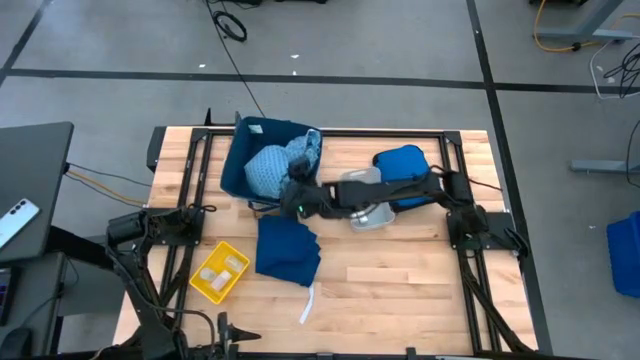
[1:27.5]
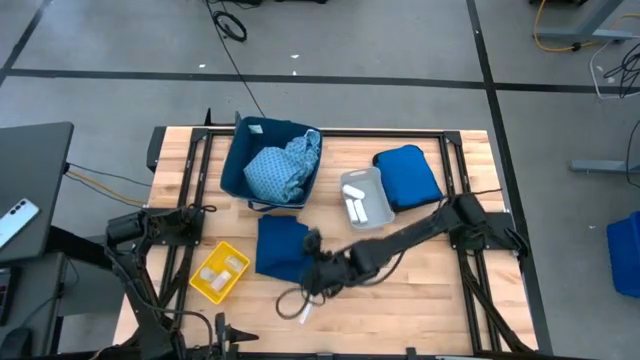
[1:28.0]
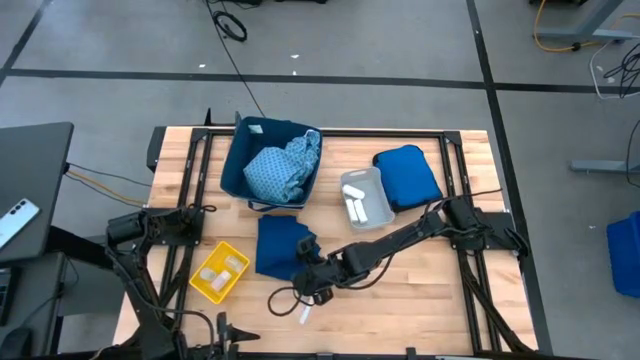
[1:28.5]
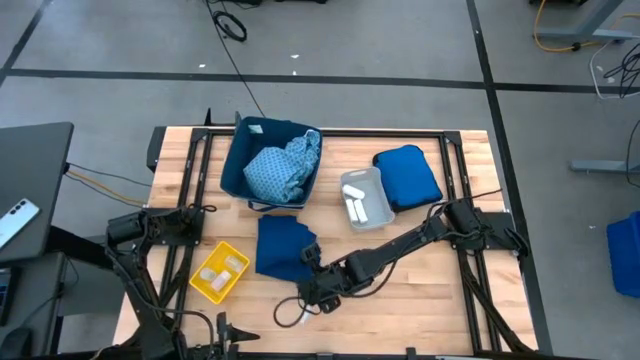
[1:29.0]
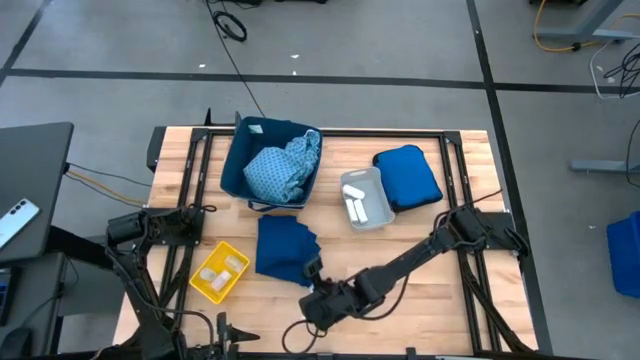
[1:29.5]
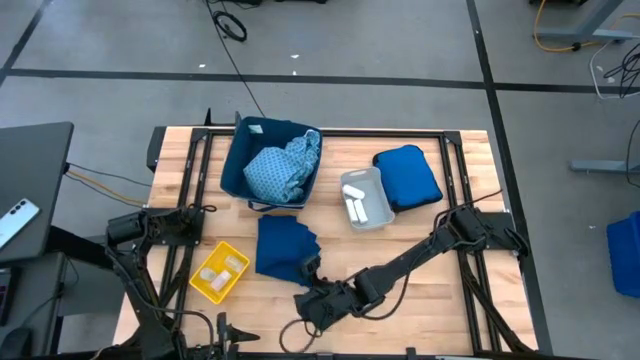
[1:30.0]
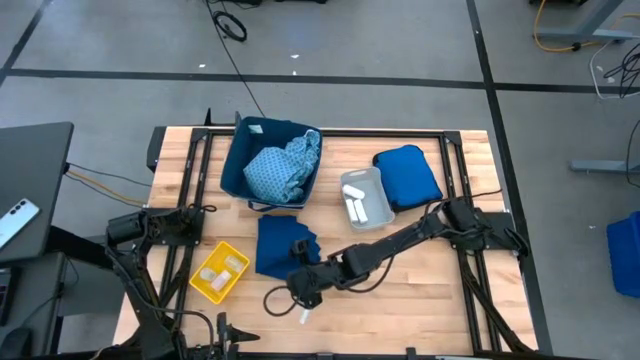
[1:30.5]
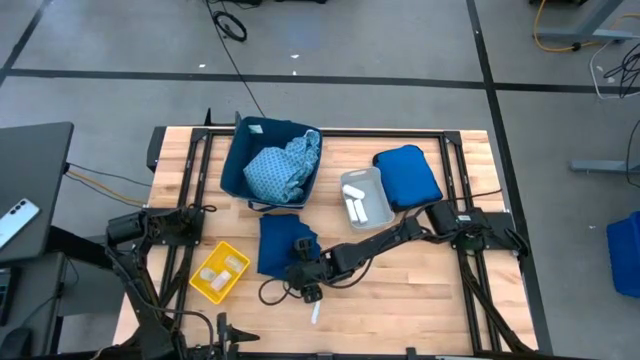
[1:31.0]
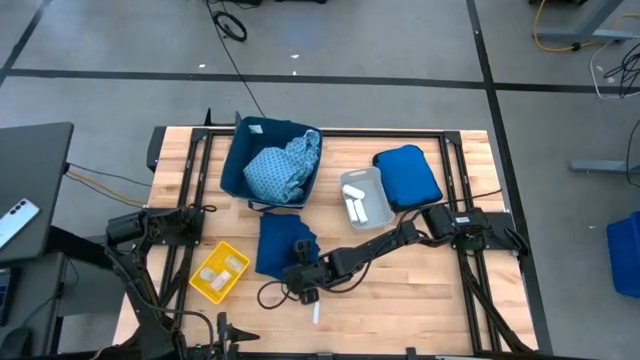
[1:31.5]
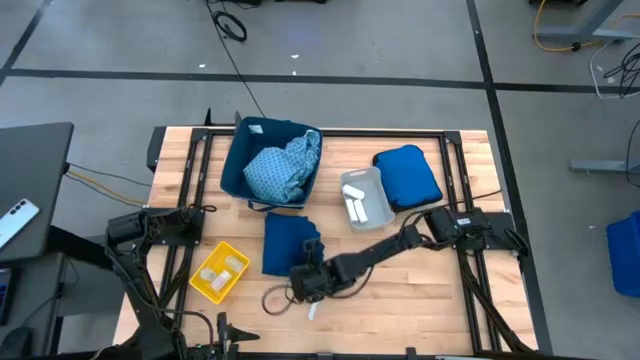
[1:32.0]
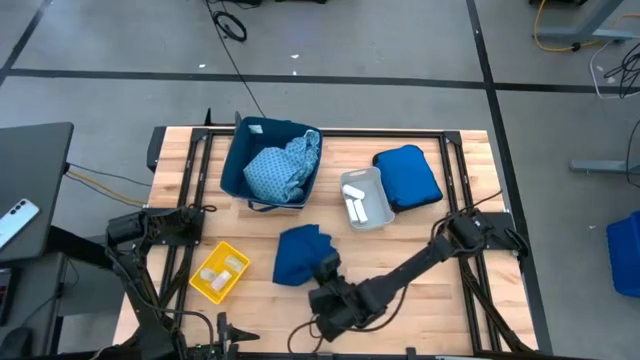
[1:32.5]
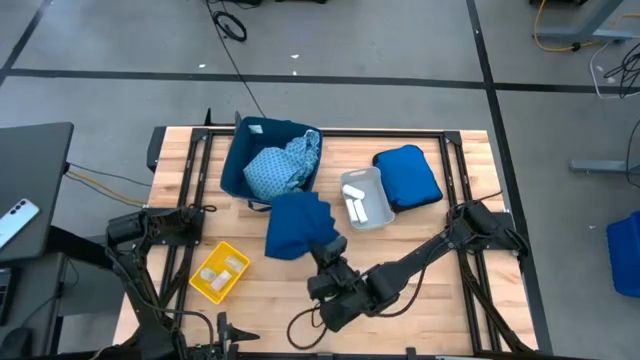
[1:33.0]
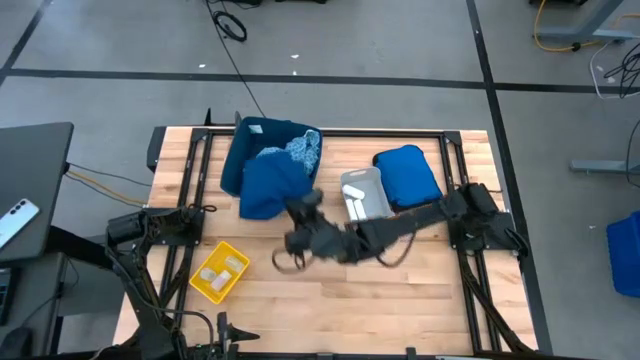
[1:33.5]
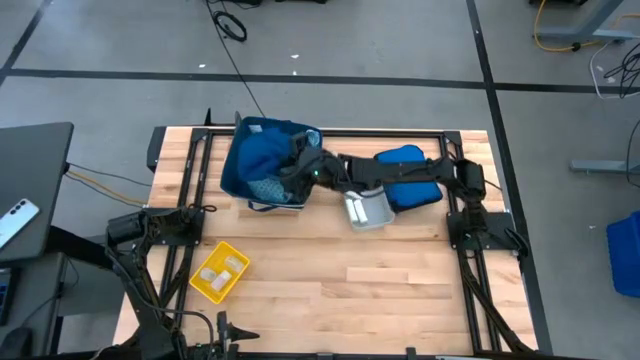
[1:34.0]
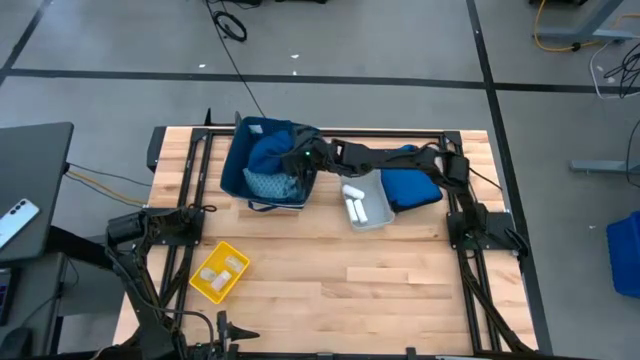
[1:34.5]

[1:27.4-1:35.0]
Task: Pick & place medical supplies in basket/bin
Put the blue patient gown into the blue bin

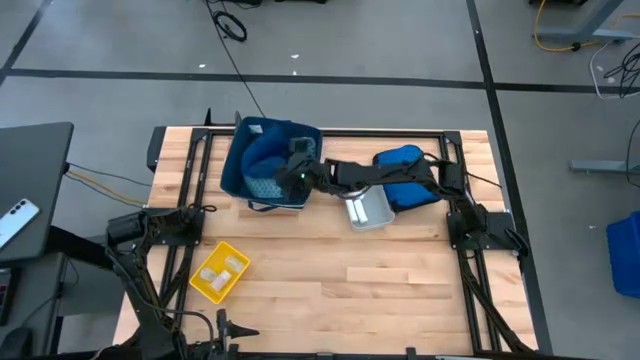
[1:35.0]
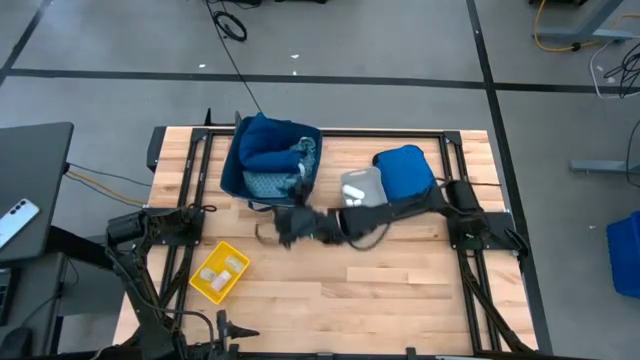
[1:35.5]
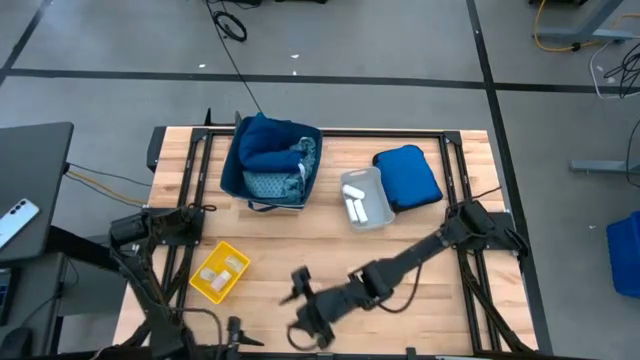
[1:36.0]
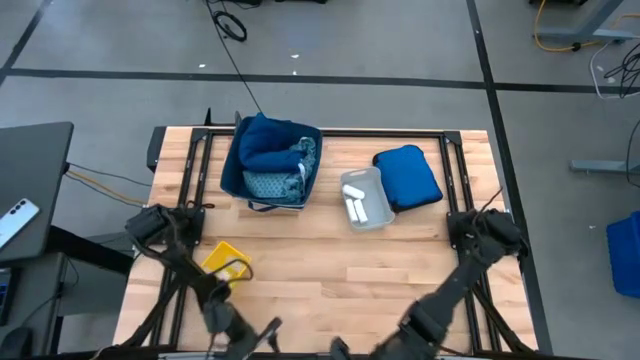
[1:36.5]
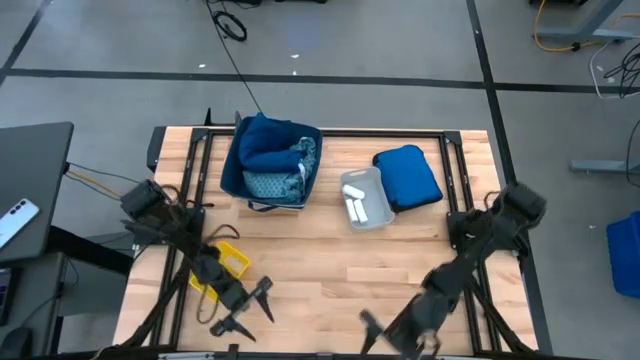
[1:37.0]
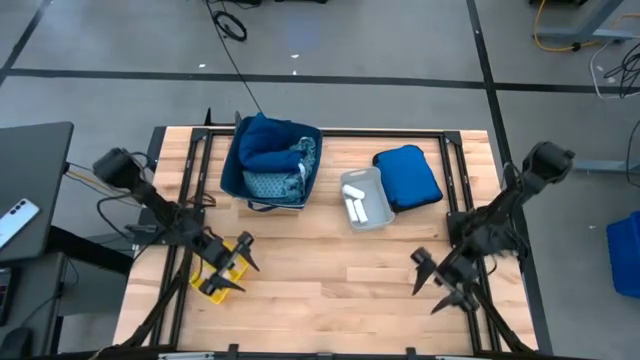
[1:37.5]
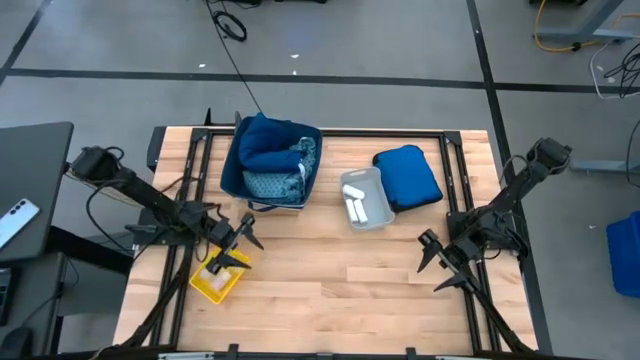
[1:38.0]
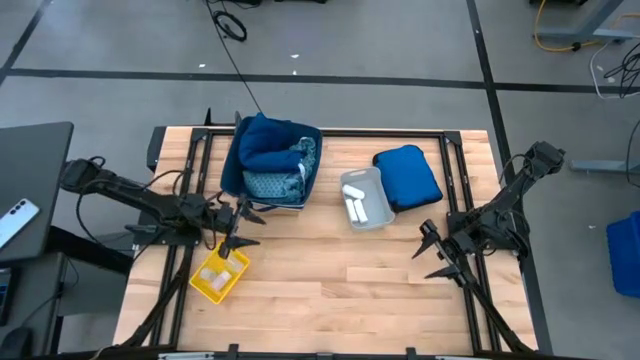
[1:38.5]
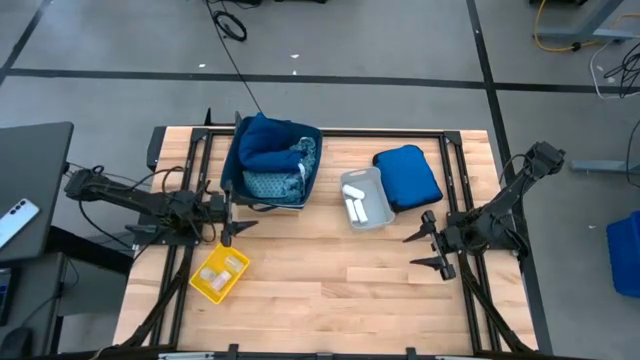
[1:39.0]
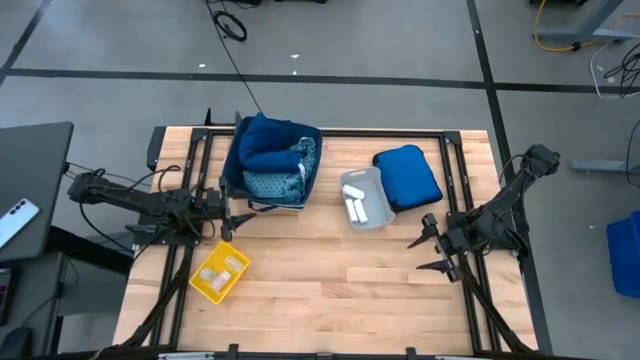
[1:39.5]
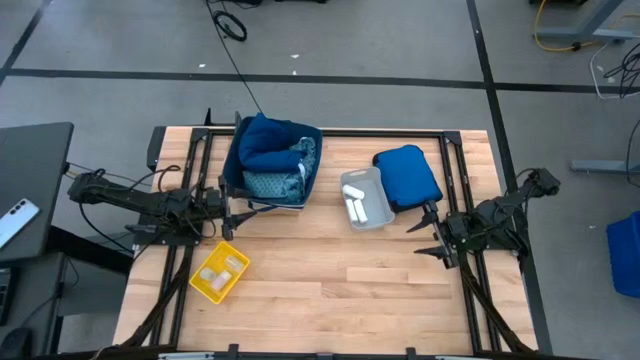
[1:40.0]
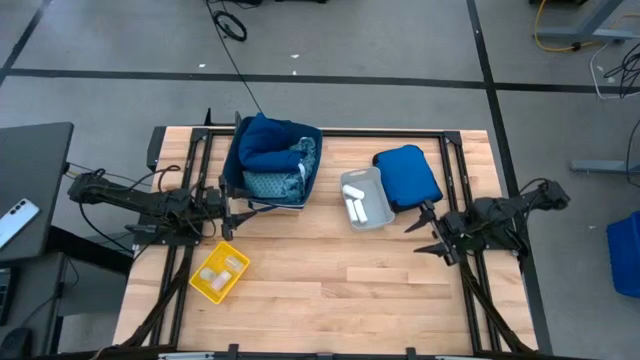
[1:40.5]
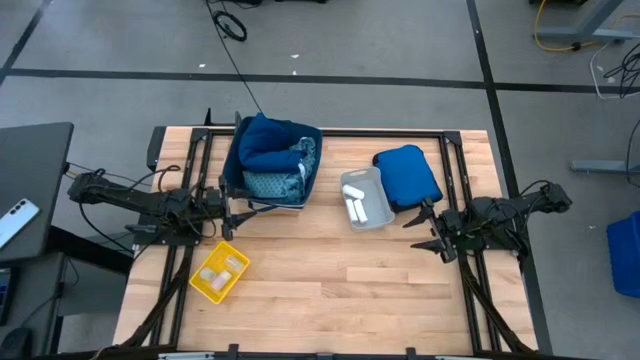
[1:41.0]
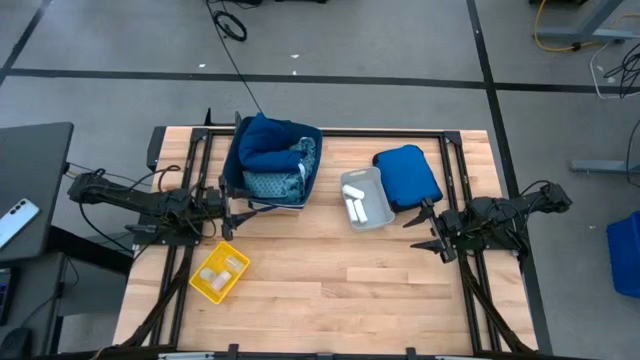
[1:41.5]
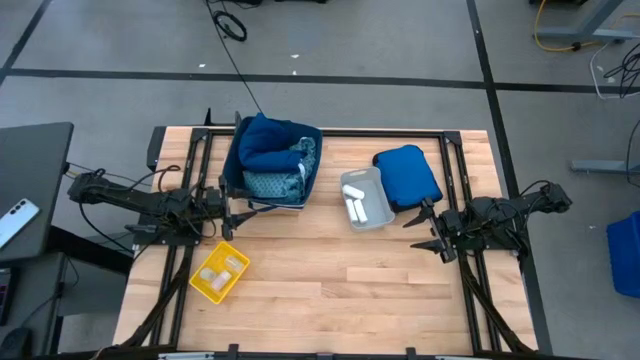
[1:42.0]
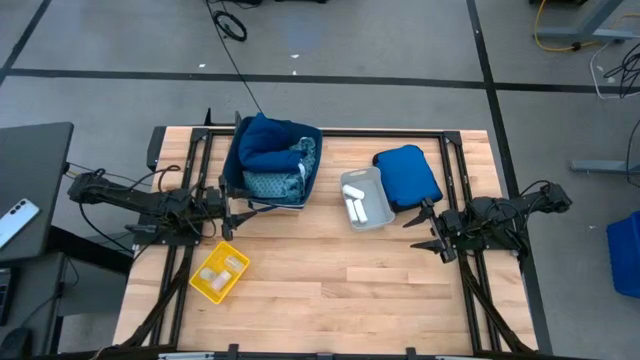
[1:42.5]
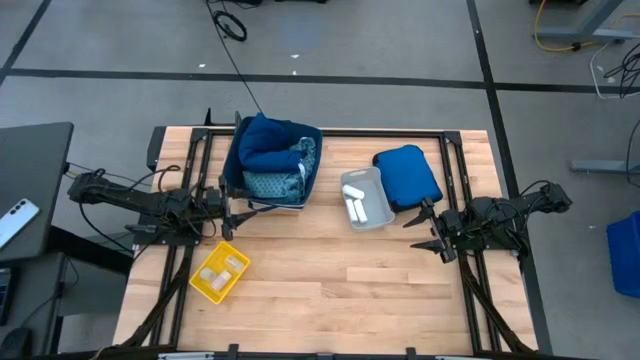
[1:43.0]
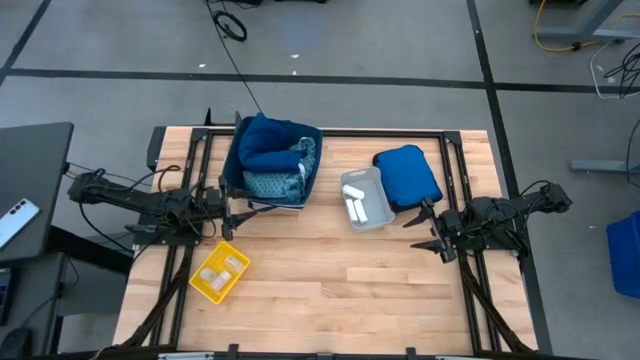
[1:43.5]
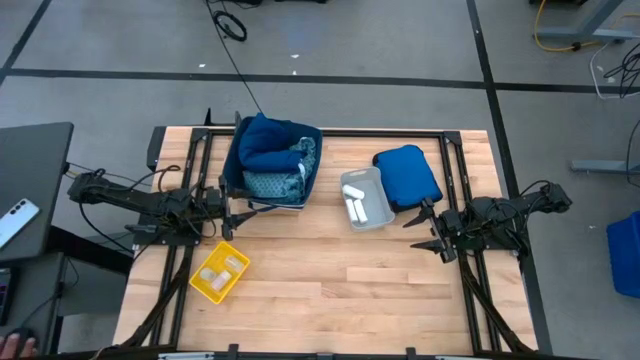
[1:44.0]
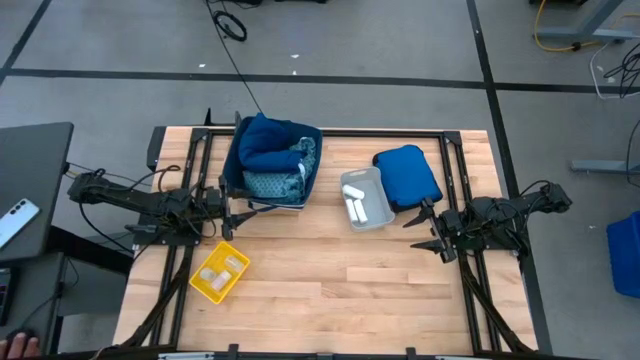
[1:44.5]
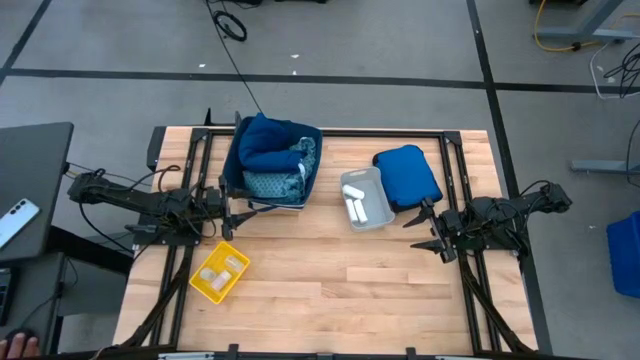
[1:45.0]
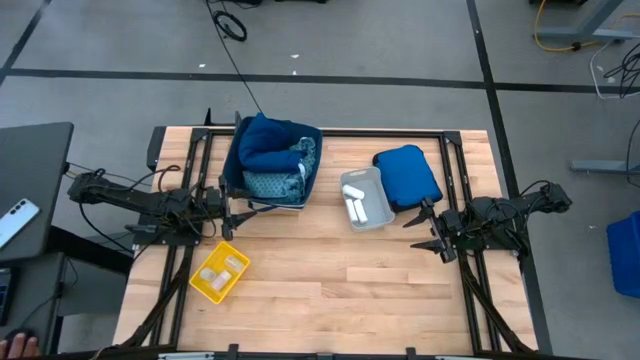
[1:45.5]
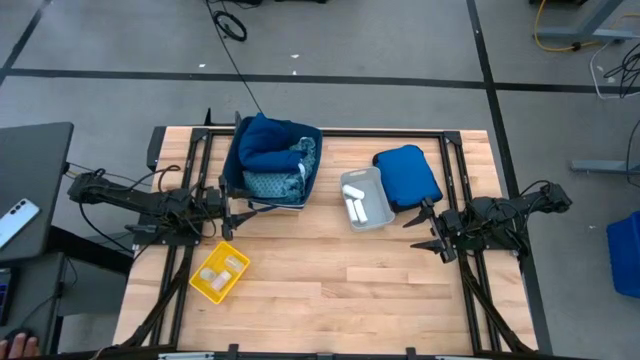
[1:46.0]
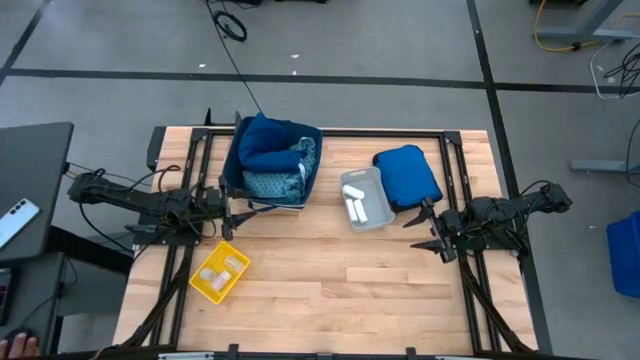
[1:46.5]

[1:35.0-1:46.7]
Return to Home Position

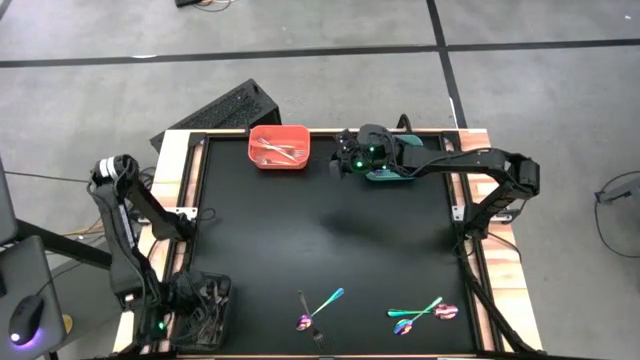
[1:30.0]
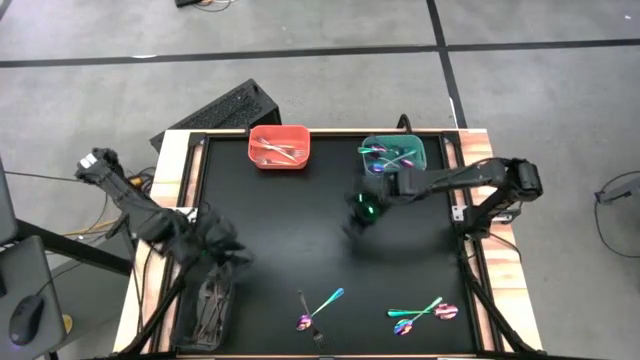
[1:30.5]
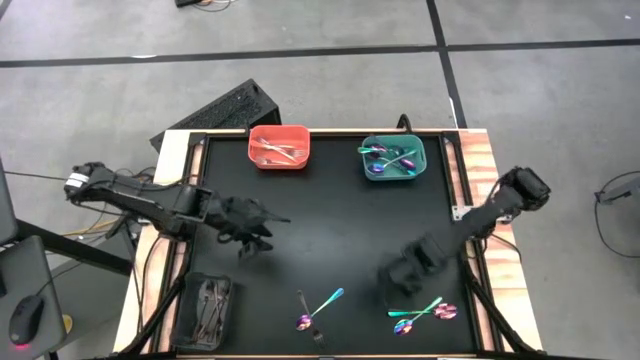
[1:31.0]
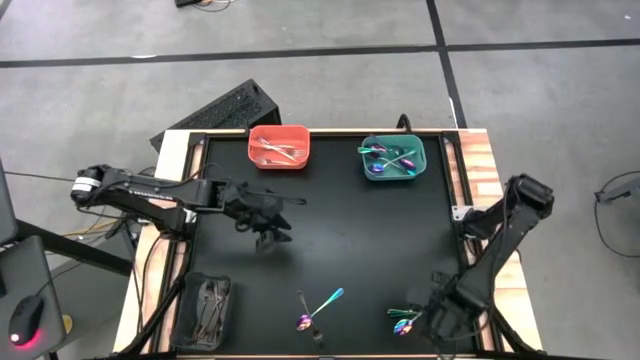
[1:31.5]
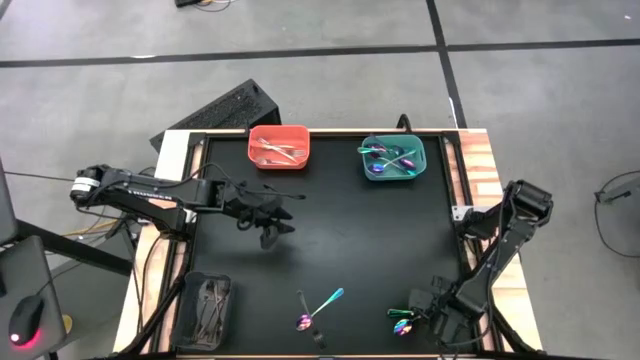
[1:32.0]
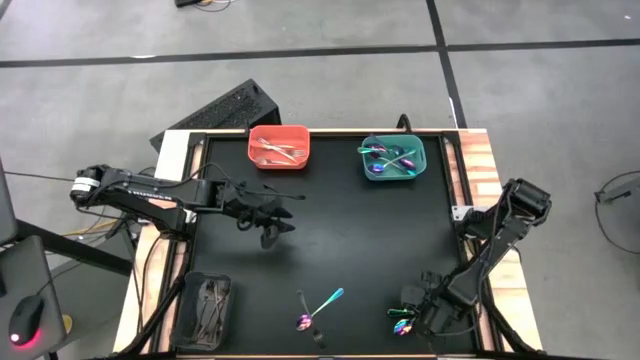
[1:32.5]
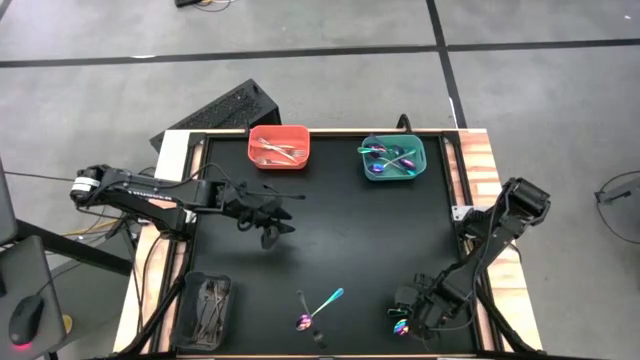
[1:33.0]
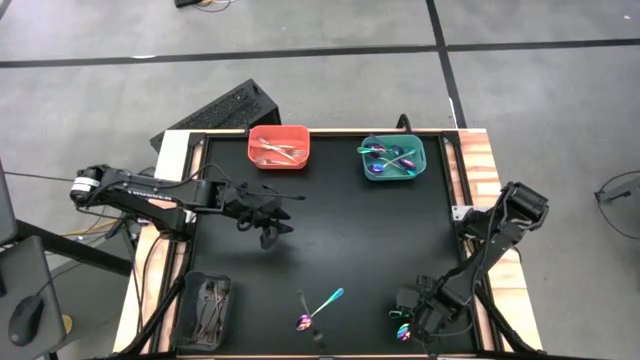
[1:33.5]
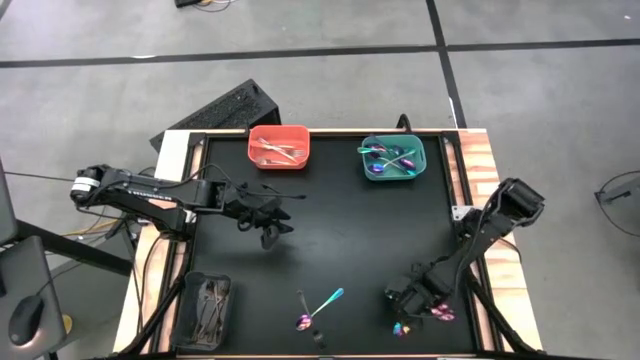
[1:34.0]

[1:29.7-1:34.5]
Task: Sort silverware by color (type)
Put the blue spoon into the blue bin
